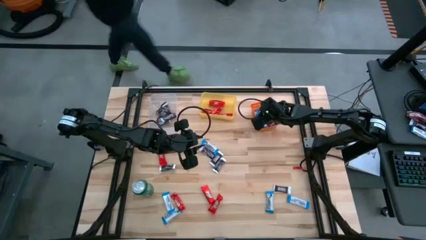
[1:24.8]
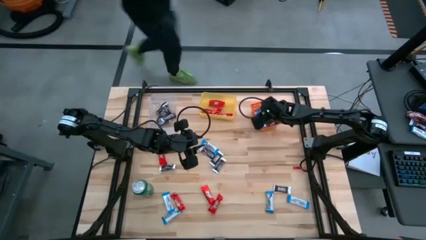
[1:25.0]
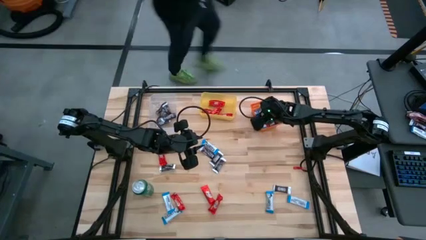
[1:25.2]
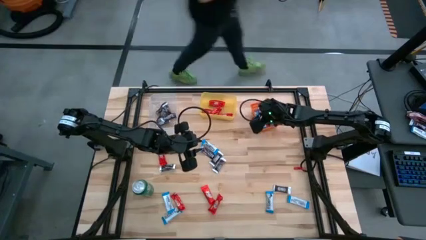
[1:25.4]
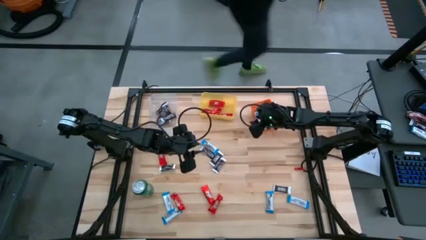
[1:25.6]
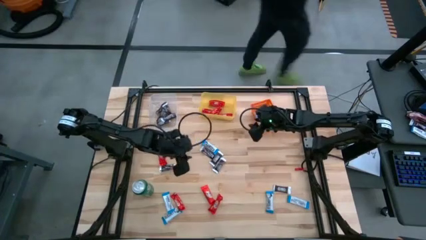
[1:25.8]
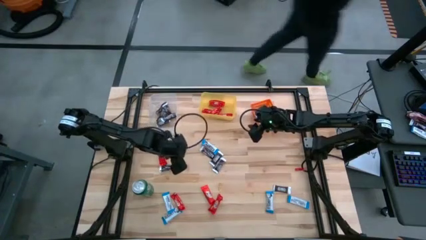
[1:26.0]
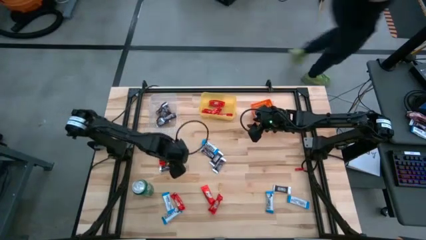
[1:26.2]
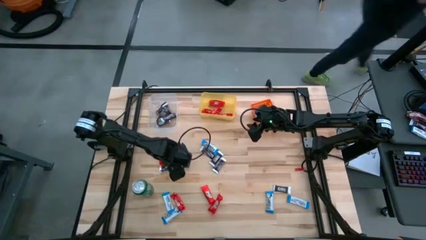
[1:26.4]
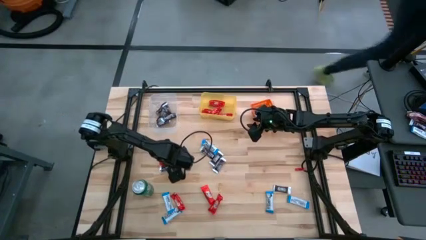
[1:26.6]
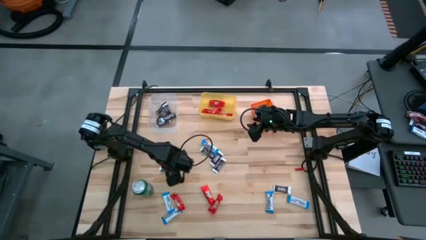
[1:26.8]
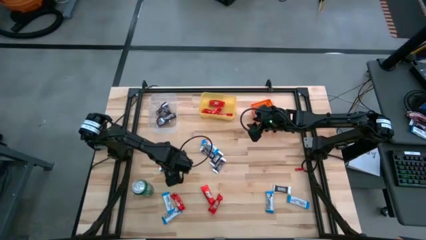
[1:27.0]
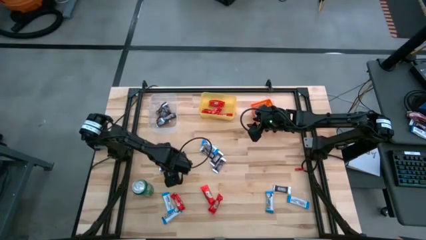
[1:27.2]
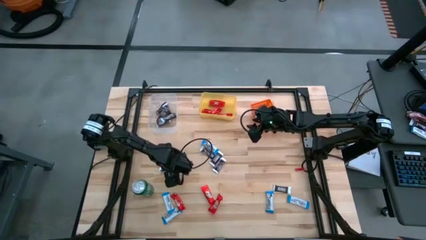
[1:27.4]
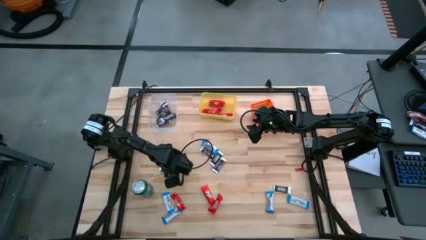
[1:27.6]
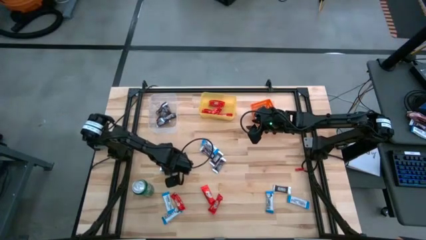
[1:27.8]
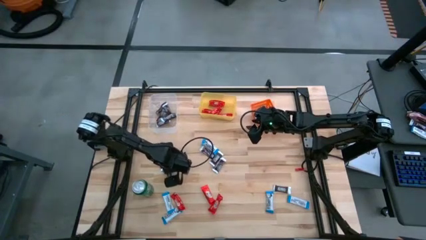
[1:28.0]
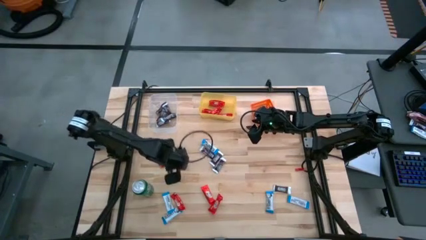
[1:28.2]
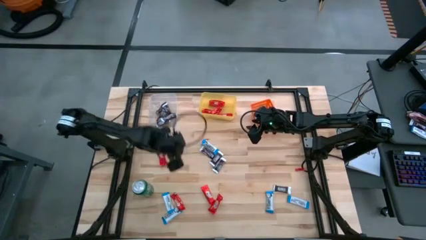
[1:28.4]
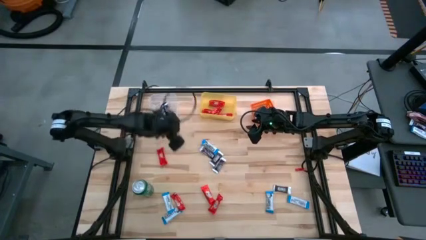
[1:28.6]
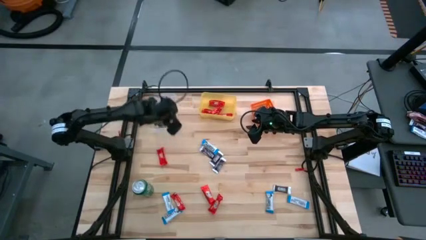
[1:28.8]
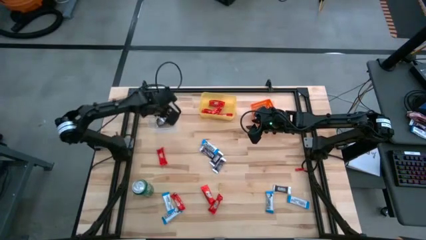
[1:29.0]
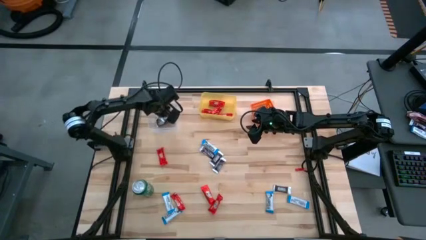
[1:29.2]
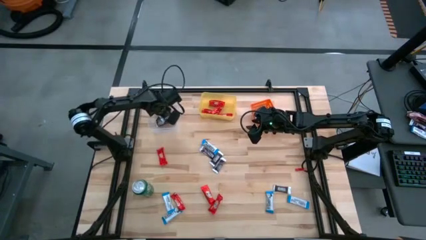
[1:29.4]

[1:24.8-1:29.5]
Task: Sort candy
Put the brown chocolate bar into the transparent bin

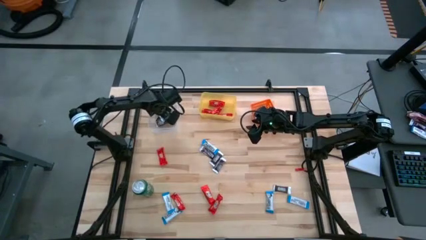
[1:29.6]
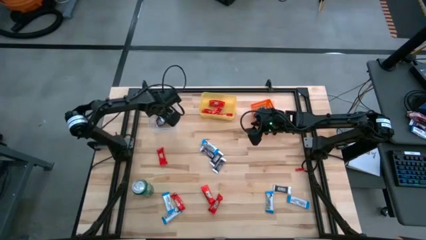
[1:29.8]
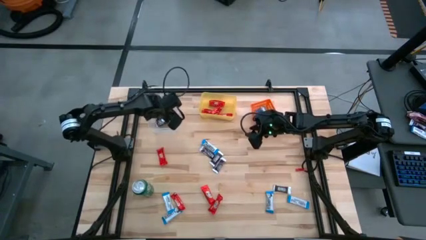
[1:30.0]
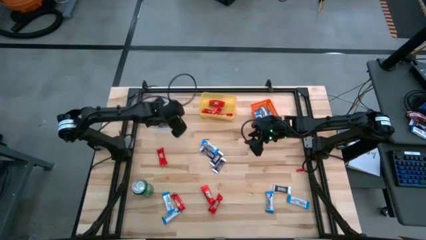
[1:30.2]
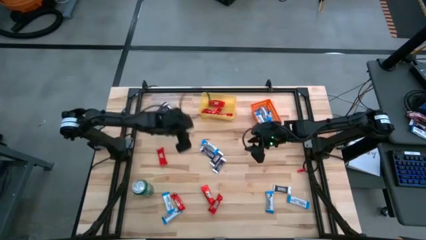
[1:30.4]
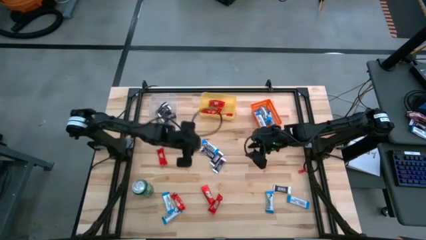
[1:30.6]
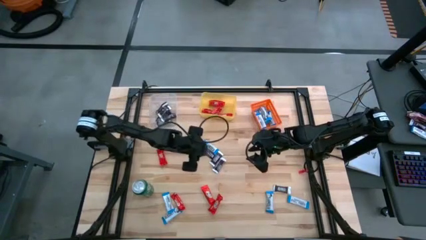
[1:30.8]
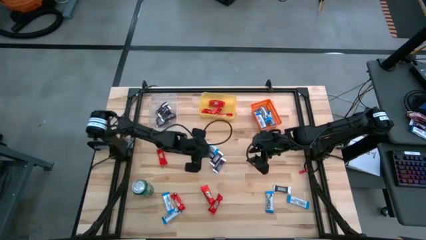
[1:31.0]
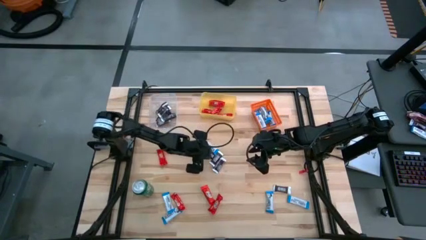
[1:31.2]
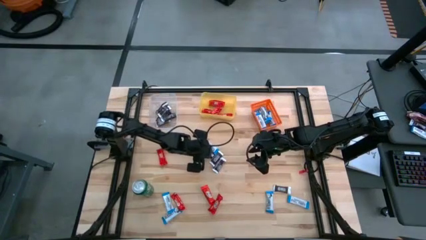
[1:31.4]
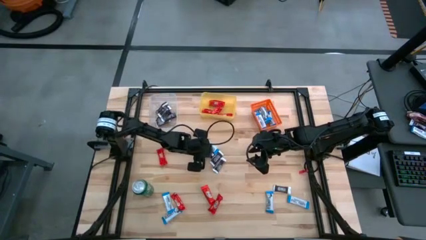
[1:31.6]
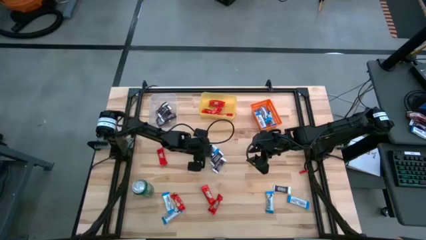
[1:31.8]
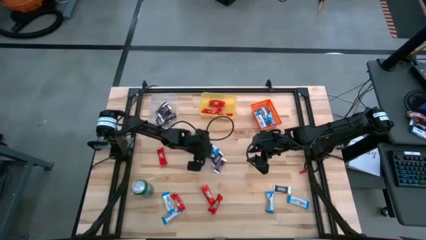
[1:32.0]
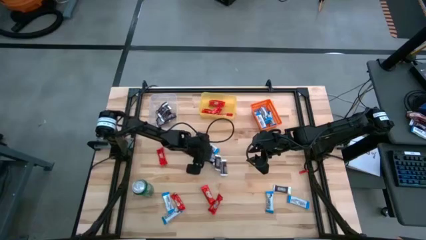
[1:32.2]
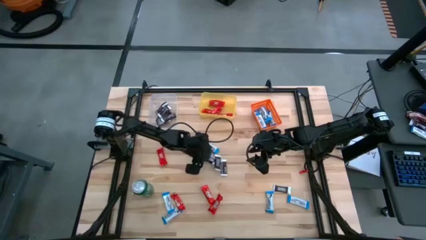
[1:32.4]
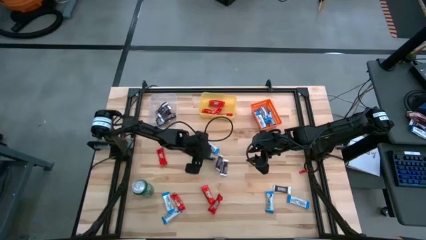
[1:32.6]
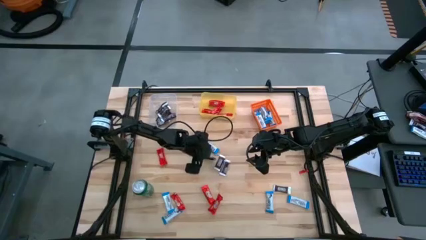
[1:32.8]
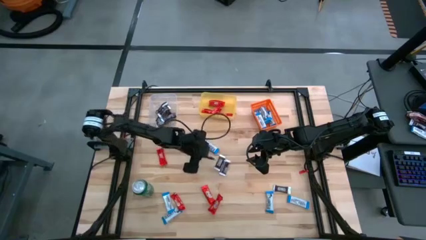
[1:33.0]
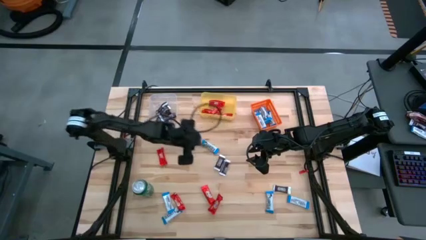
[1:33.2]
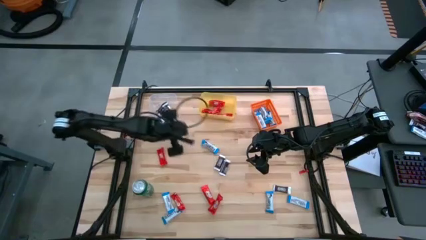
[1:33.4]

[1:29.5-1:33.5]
Put the brown chocolate bar into the transparent bin

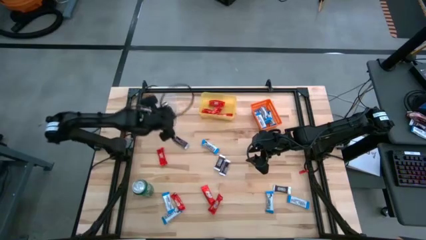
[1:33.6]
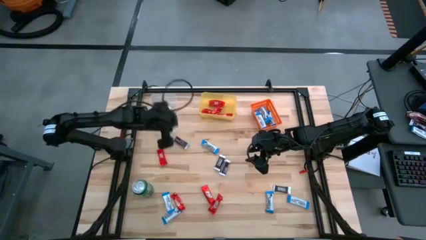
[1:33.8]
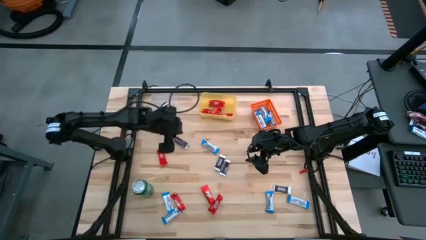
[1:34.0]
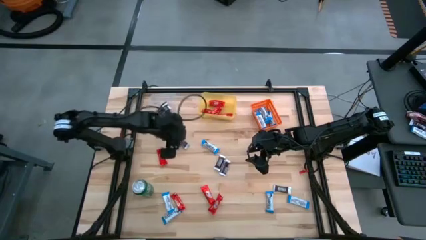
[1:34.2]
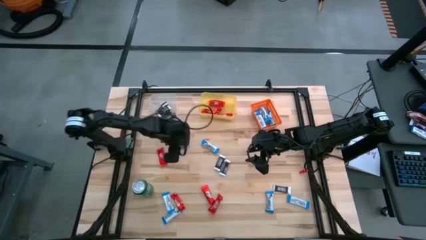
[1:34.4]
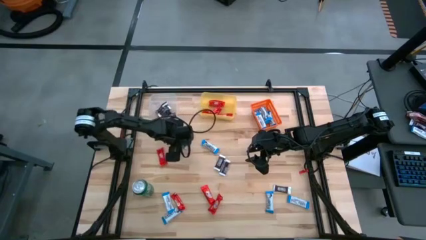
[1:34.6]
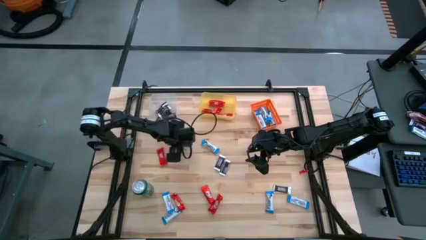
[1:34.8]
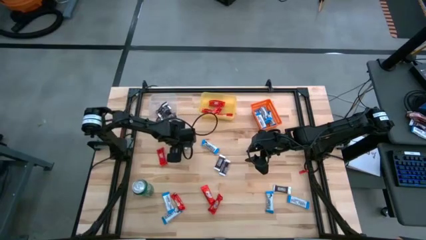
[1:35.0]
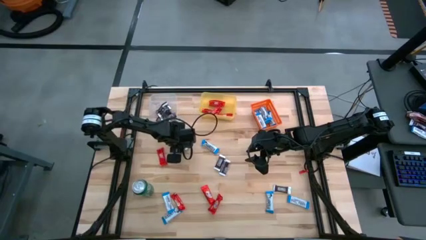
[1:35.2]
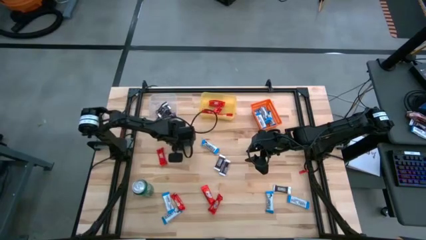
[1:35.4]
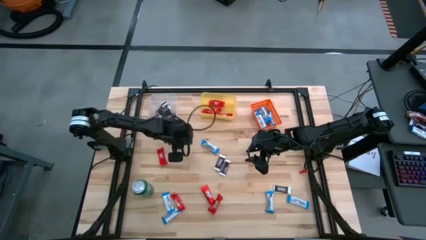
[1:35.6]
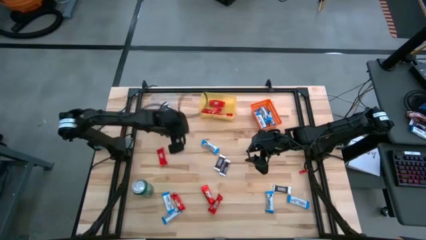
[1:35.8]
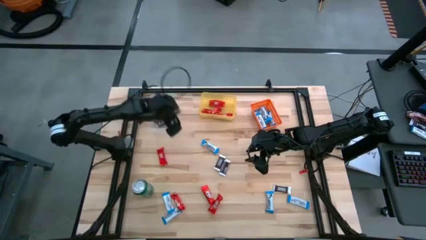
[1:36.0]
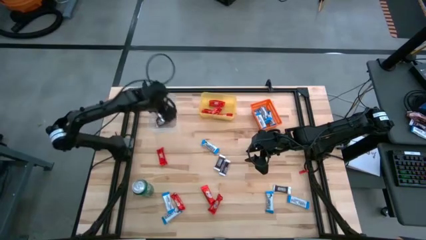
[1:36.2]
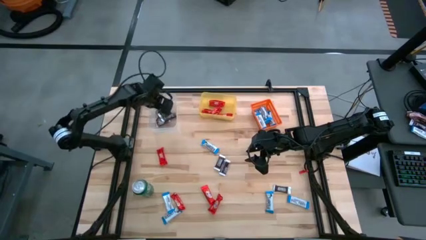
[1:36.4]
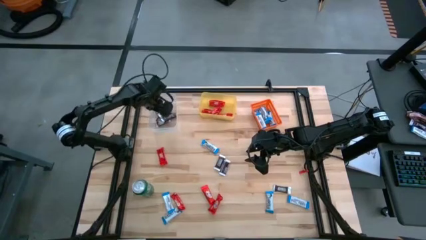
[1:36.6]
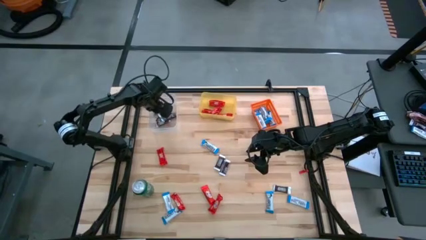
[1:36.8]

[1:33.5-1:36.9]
Put the brown chocolate bar into the transparent bin

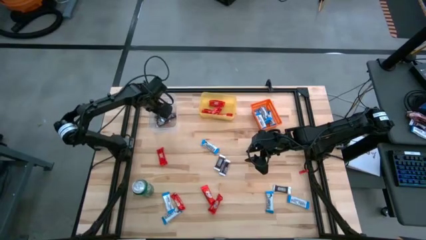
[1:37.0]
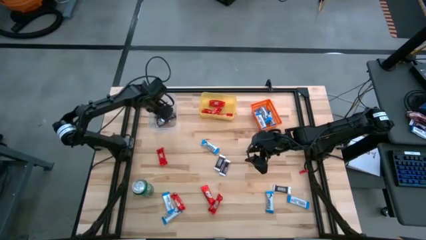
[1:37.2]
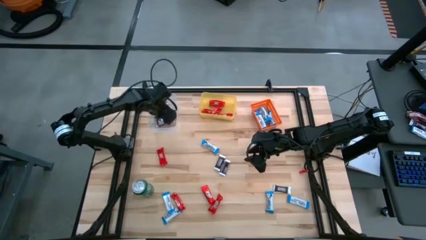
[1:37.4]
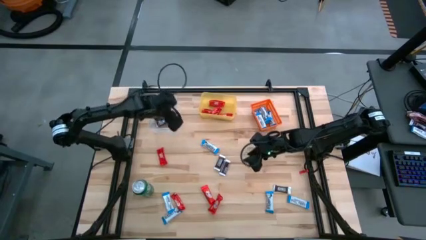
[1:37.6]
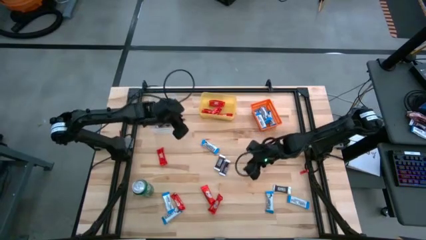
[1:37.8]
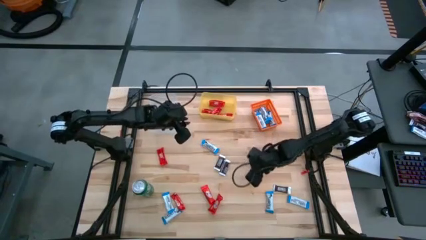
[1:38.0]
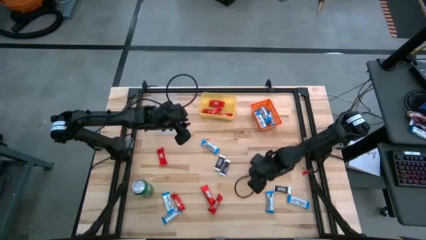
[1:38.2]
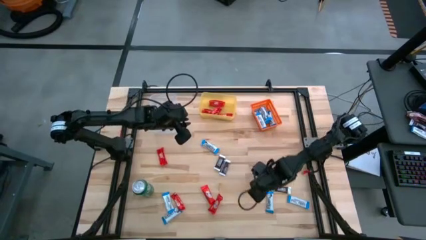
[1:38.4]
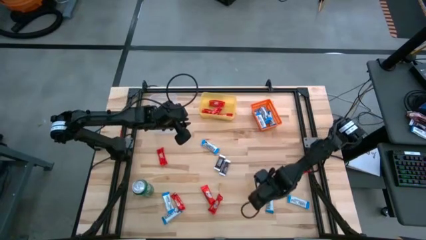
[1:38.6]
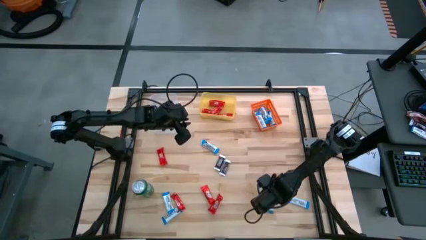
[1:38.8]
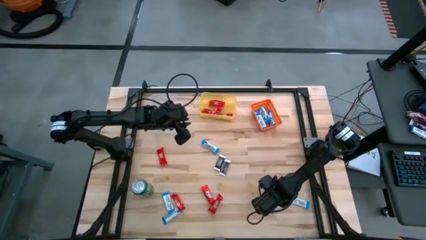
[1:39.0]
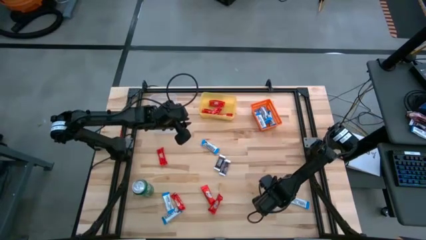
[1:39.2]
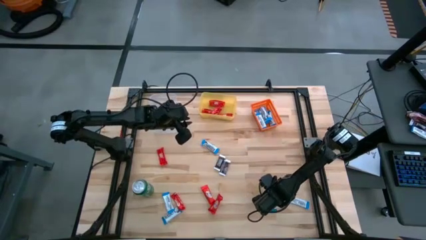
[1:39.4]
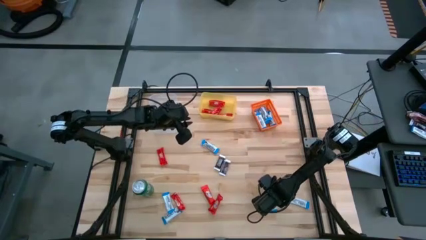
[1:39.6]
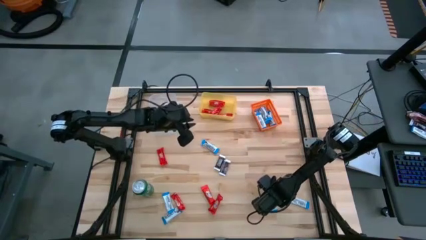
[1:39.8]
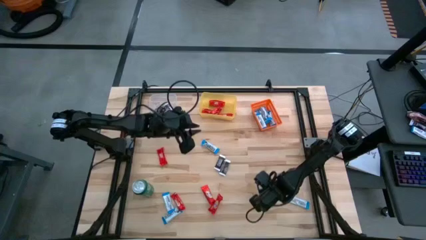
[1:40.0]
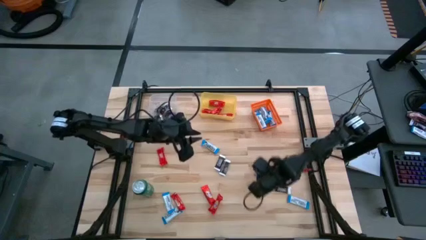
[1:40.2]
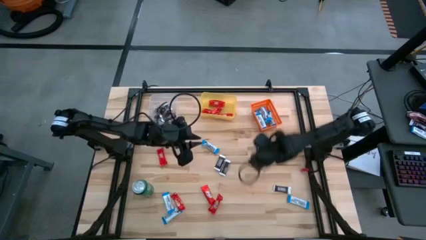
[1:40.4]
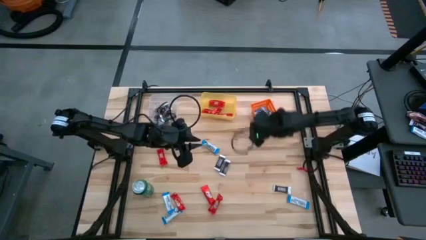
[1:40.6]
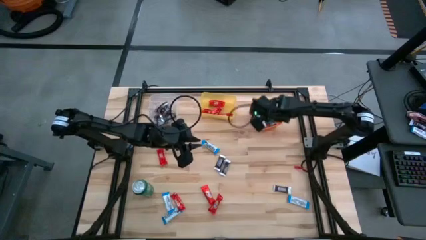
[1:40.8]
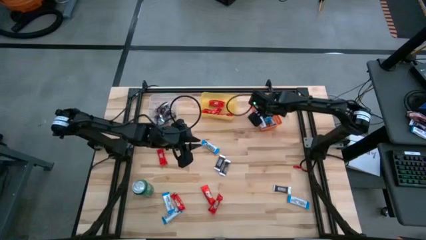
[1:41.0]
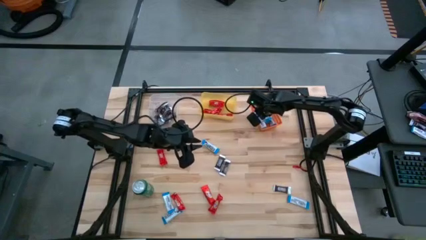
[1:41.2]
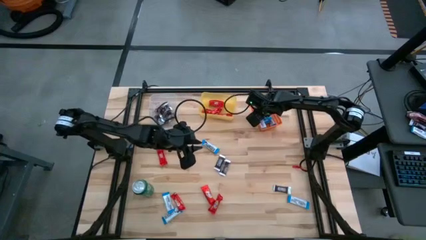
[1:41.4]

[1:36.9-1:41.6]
Put the white chocolate bar into the orange bin
